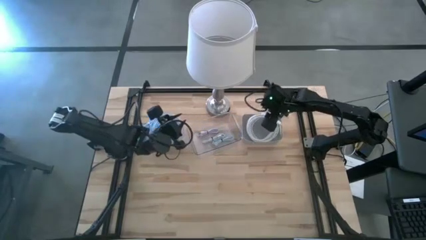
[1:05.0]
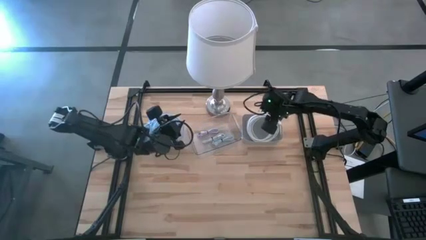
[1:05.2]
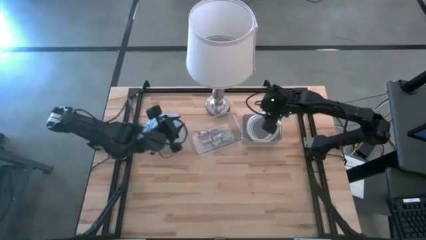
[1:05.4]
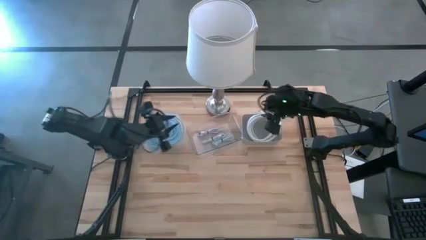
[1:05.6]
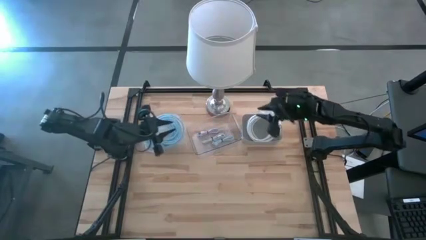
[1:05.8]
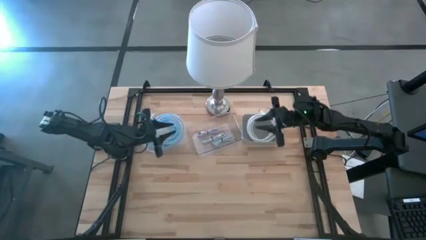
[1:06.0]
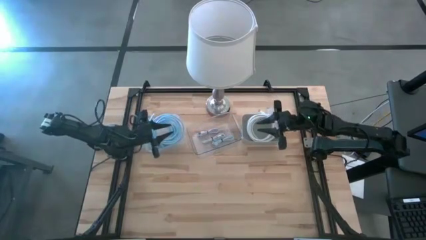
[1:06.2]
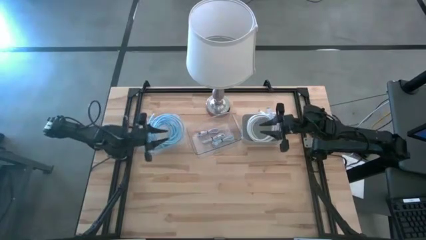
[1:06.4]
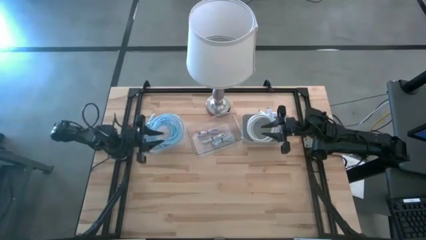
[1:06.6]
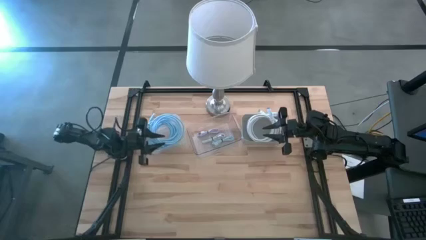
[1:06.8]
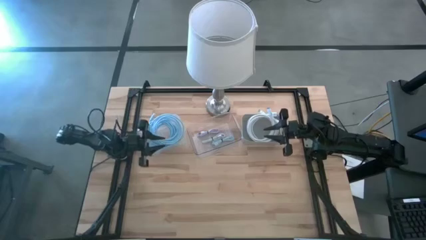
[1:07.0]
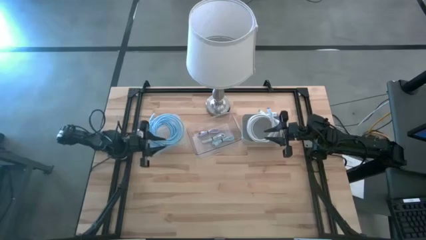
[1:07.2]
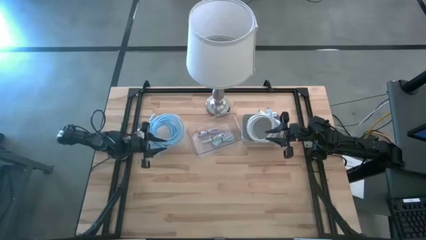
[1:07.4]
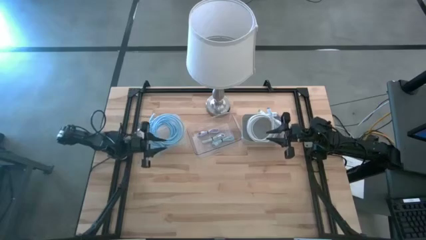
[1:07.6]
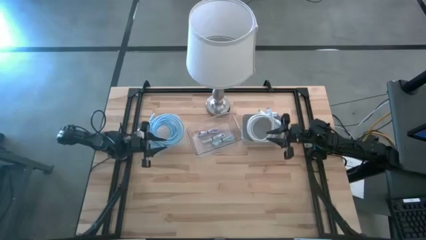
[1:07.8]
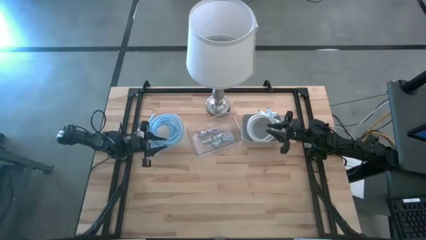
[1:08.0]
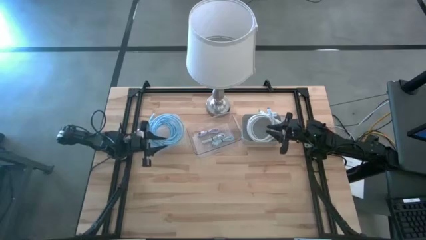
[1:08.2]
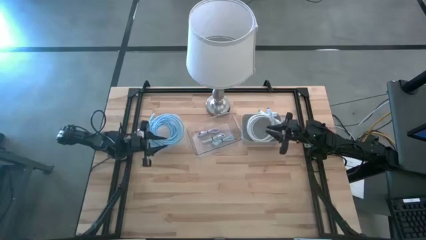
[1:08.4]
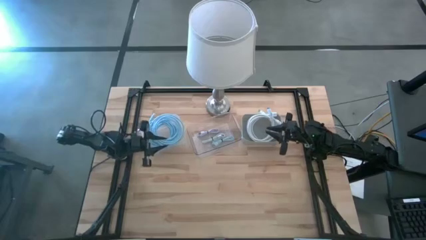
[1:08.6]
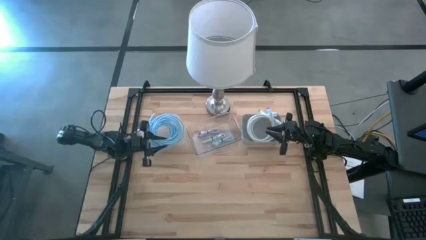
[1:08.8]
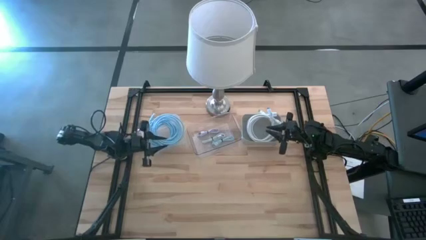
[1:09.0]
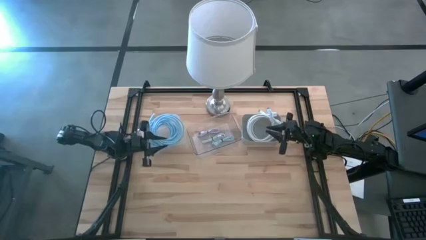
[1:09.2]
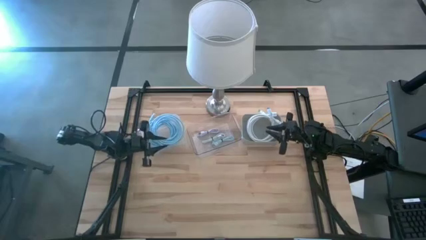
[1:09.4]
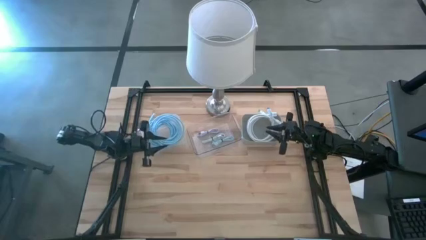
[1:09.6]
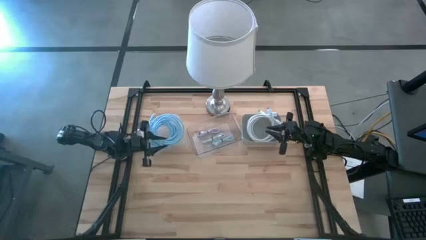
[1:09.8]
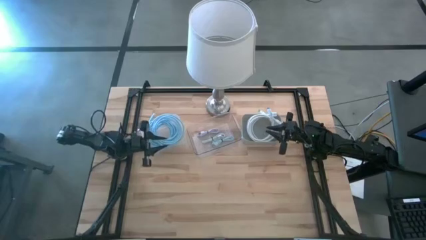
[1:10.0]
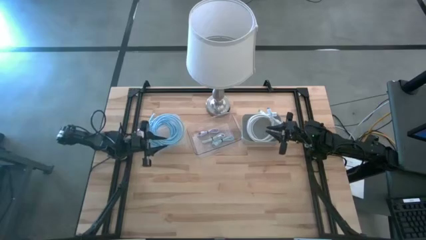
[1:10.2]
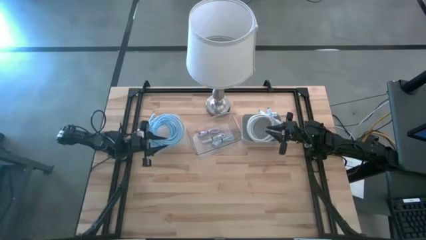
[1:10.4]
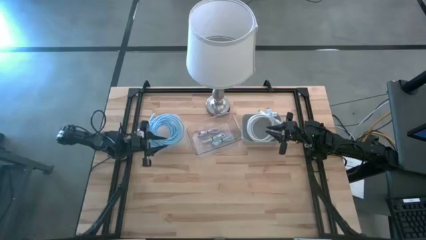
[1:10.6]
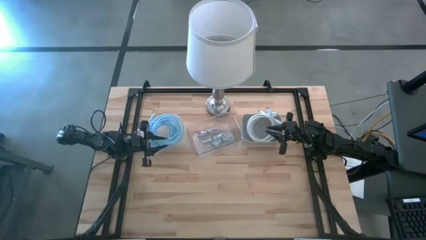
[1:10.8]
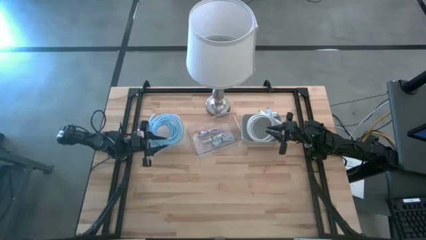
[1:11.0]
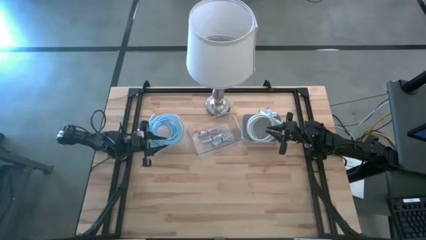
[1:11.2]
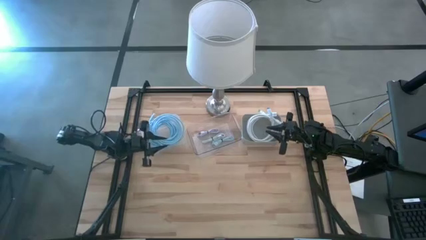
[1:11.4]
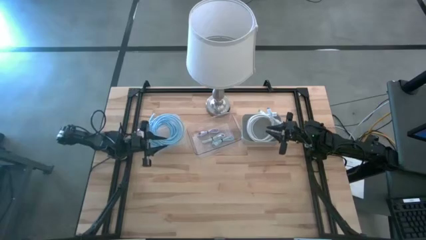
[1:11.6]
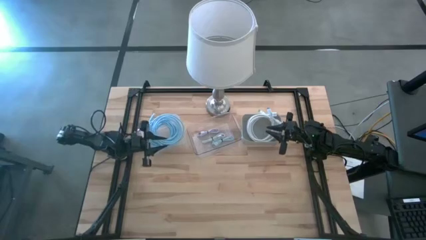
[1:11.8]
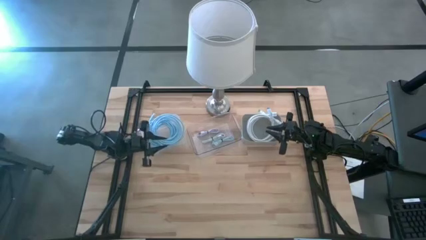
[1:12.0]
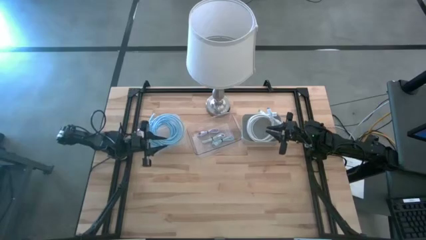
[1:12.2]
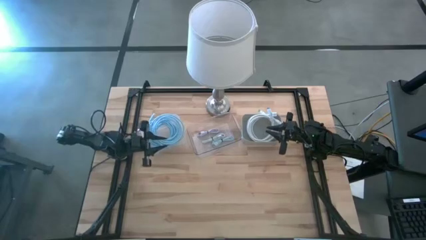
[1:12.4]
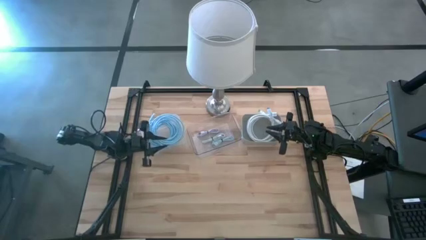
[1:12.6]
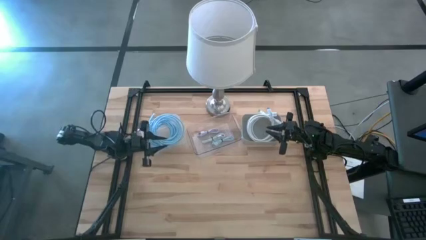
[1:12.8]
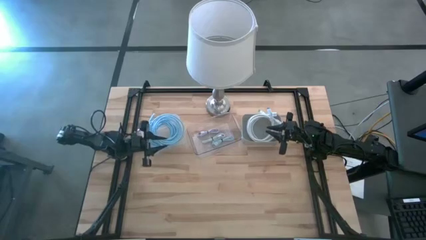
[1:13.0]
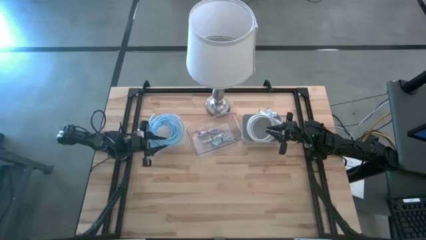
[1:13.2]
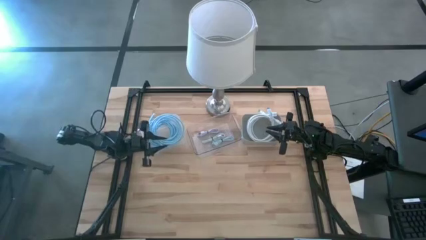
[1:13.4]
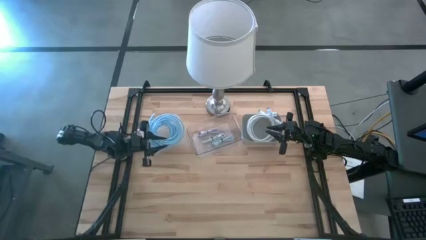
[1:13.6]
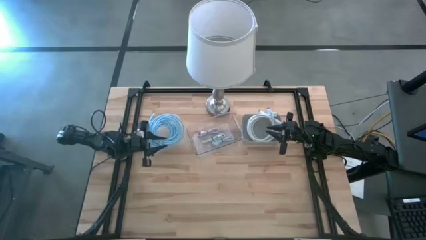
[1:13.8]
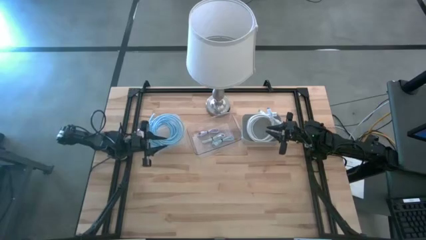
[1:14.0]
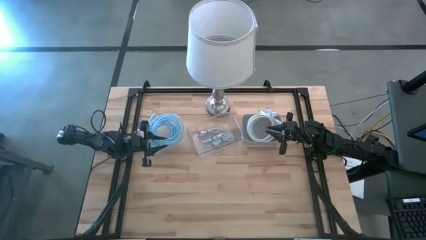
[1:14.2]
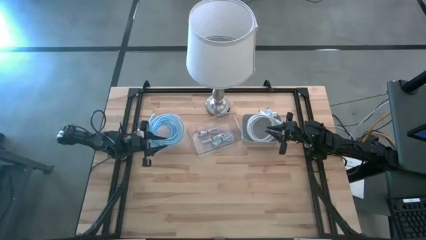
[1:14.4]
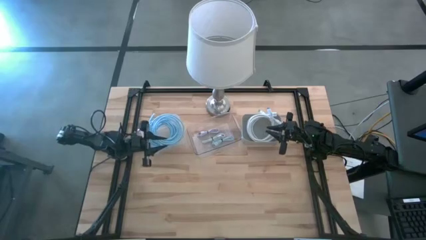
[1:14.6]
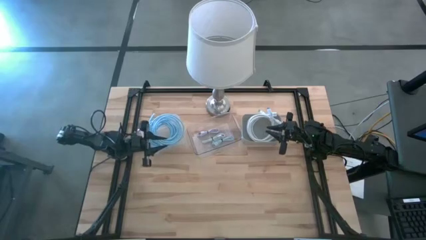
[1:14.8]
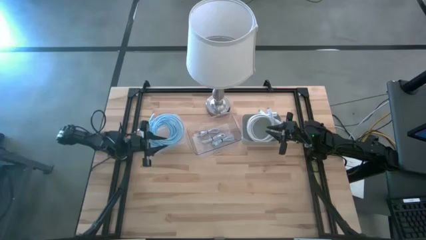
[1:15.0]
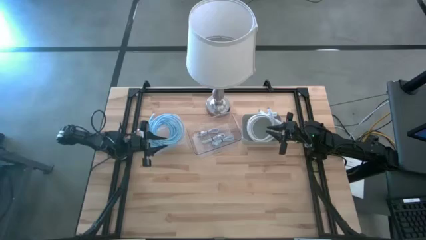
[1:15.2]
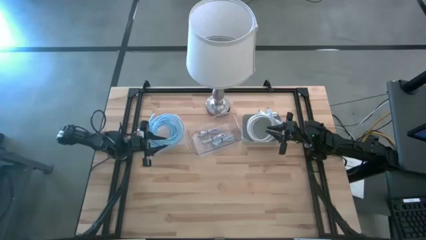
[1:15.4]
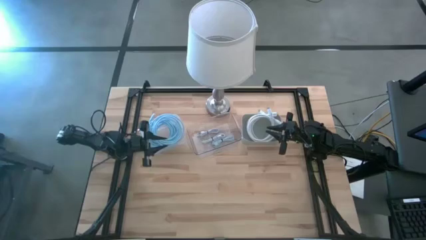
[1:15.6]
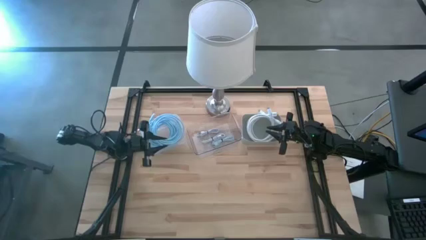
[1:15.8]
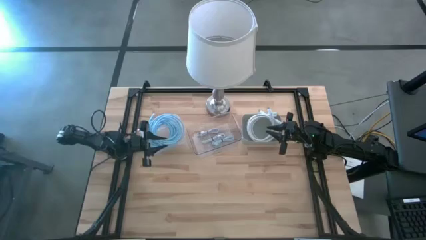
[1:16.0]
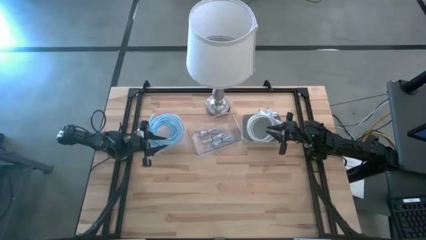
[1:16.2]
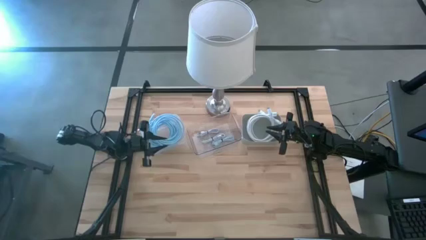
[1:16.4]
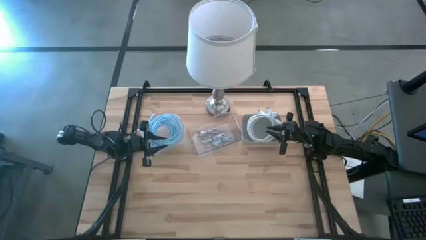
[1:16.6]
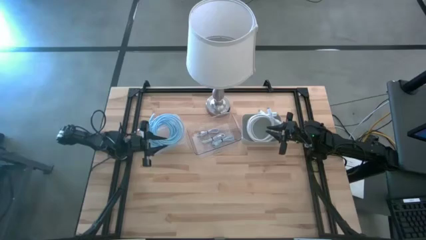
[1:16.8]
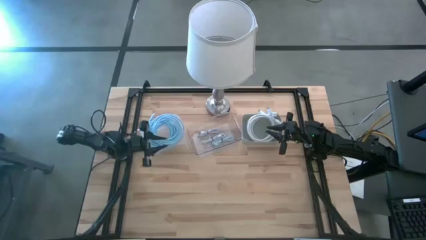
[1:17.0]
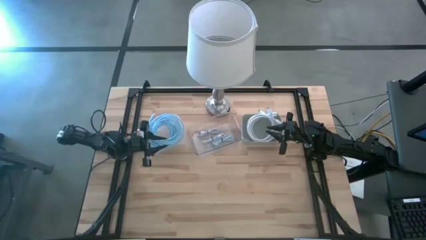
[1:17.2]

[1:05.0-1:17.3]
Task: Pick & Place USB Port
Return to Home Position

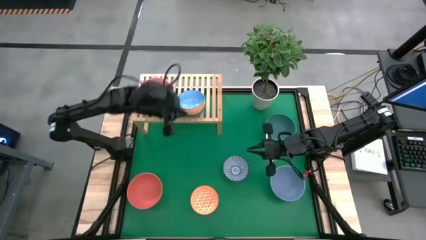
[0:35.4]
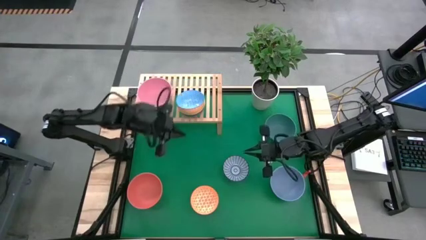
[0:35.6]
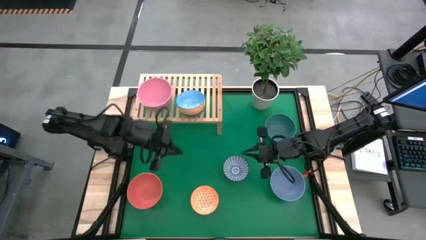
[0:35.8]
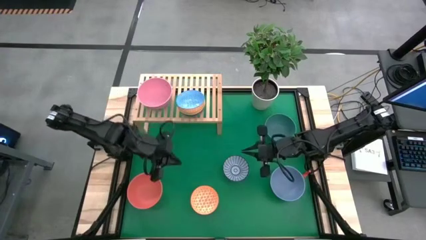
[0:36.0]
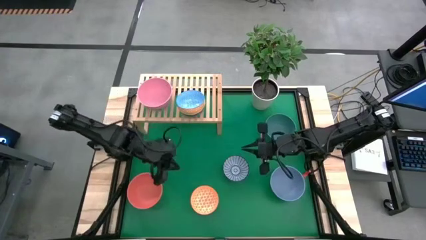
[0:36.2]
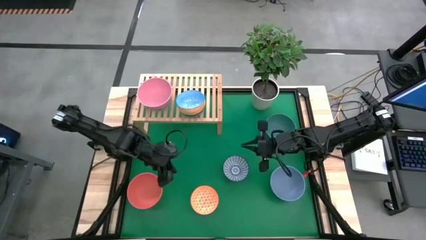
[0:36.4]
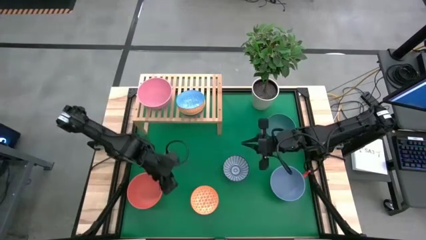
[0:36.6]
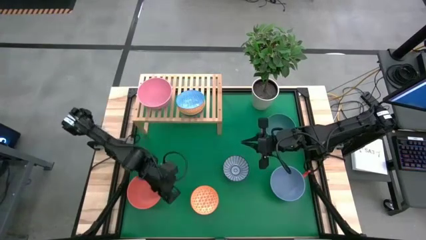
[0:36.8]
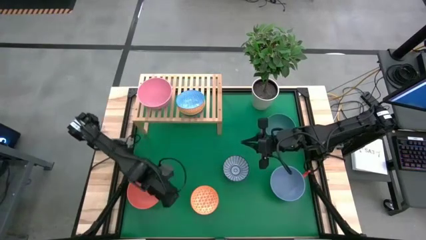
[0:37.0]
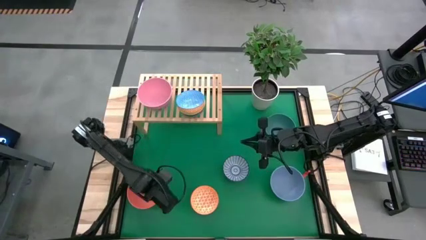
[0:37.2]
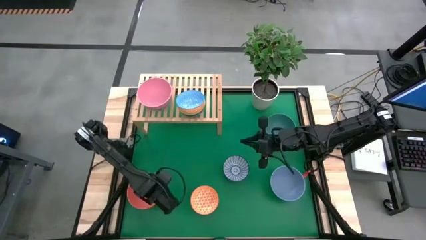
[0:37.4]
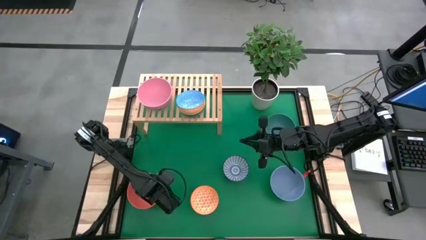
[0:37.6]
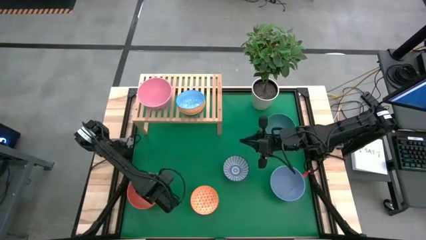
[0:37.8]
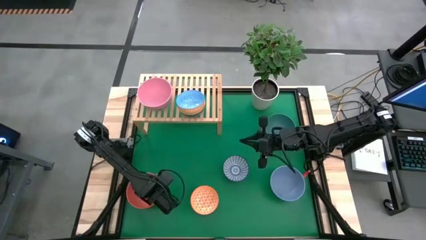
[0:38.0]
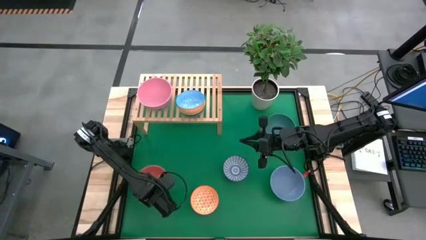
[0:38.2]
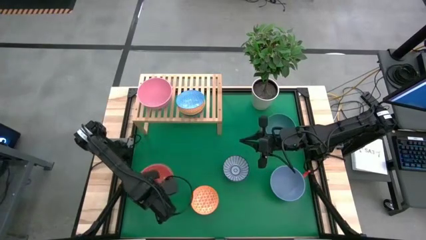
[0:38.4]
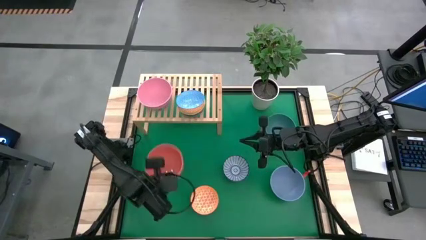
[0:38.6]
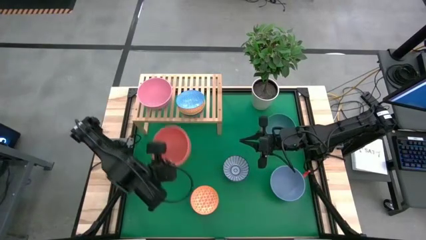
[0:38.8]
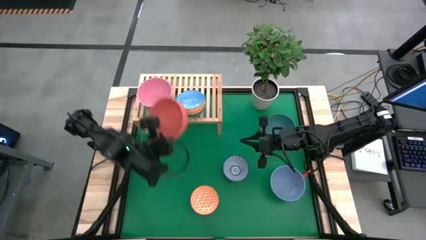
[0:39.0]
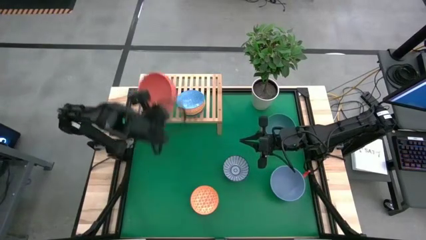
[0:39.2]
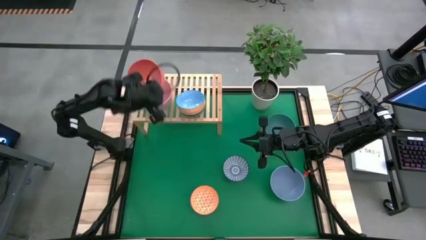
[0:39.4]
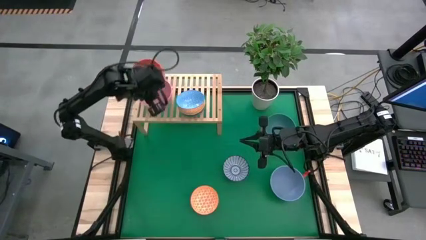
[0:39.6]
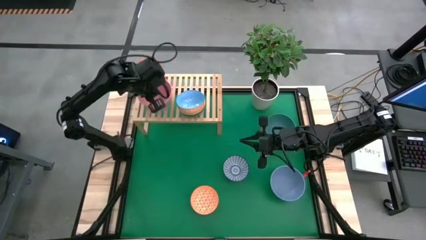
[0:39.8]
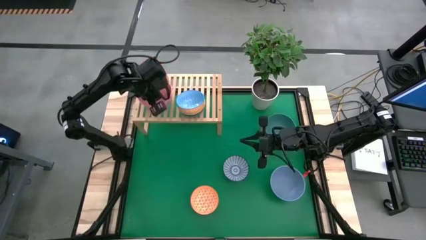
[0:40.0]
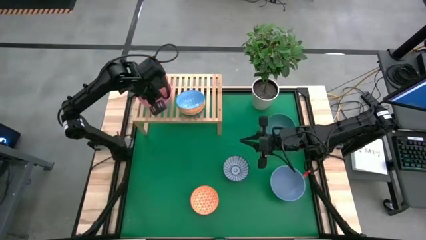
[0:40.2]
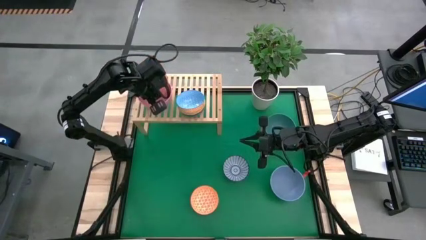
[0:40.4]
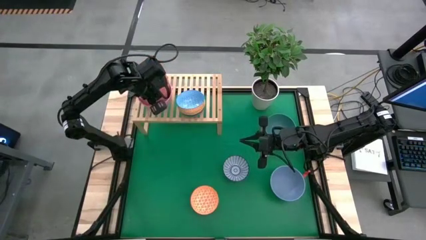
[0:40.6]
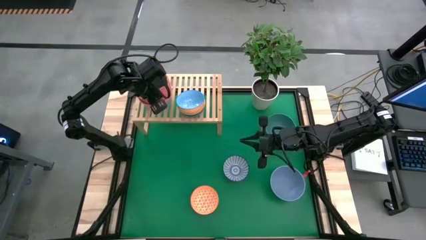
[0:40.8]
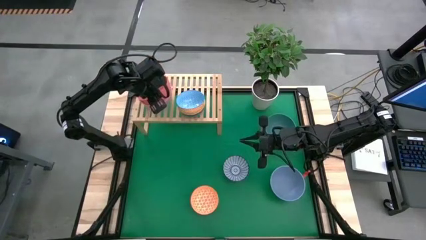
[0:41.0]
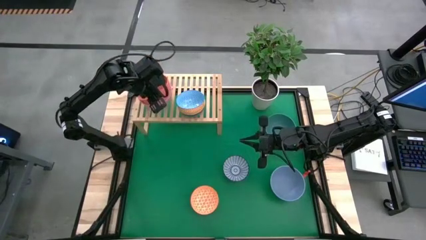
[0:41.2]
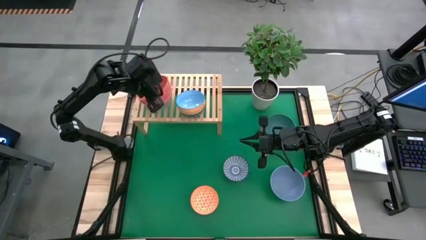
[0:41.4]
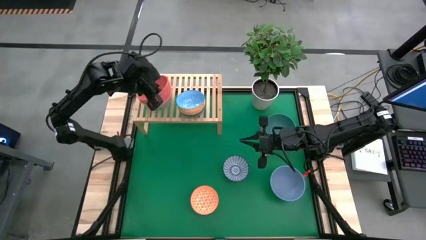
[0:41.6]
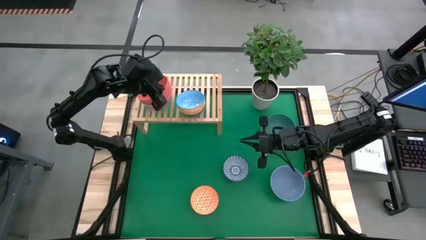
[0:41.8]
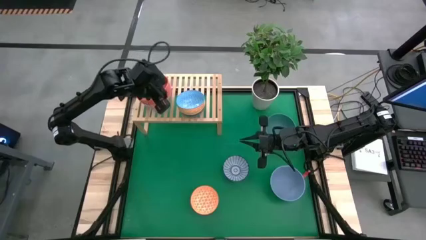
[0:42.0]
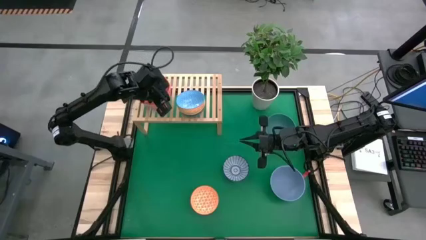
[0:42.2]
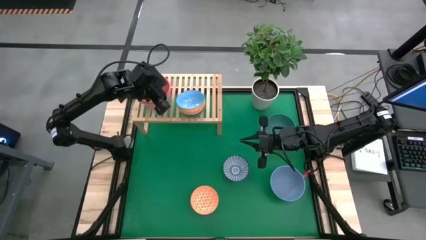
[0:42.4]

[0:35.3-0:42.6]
Task: Place and stack bowls onto a shelf
Stack the orange bowl on top of the pink bowl on the shelf
